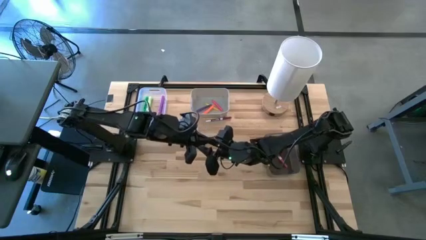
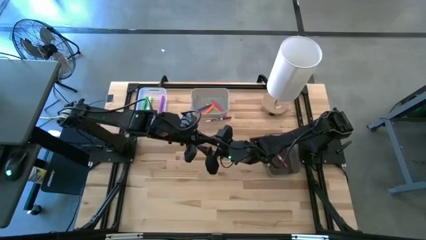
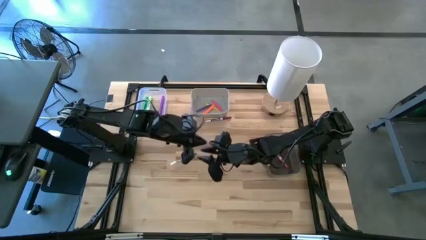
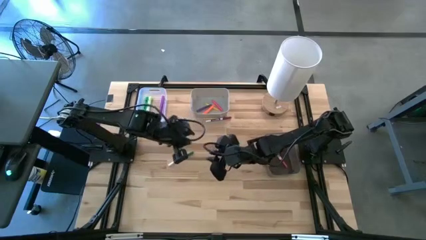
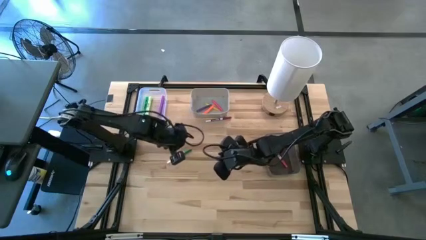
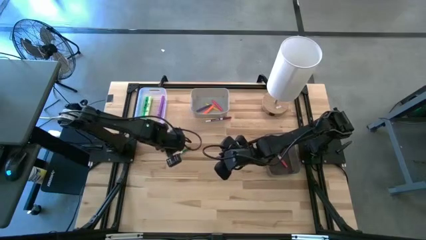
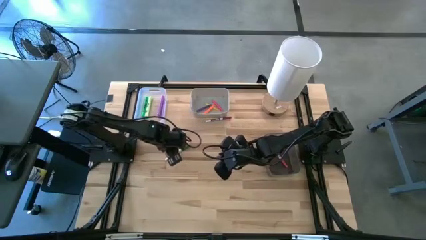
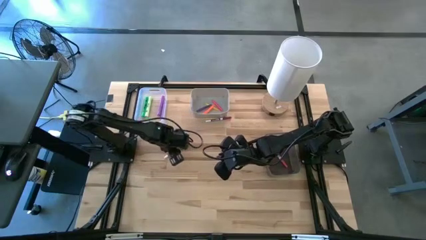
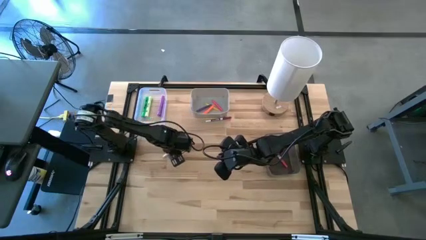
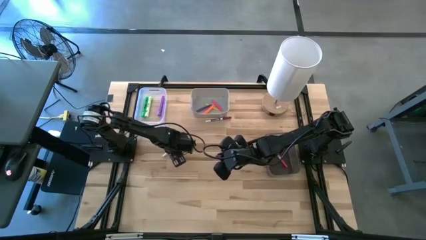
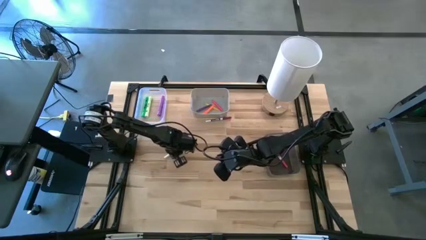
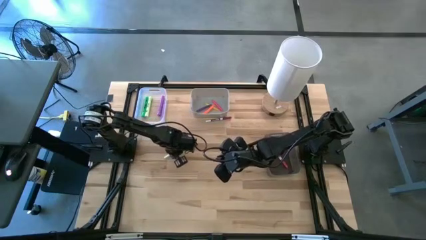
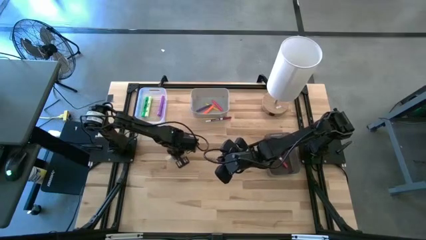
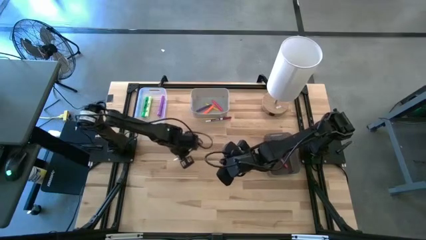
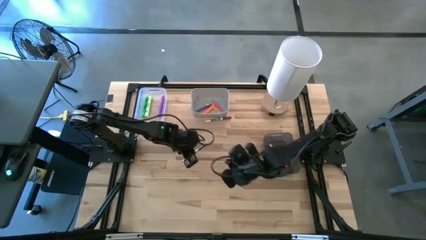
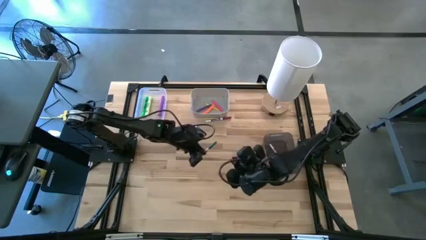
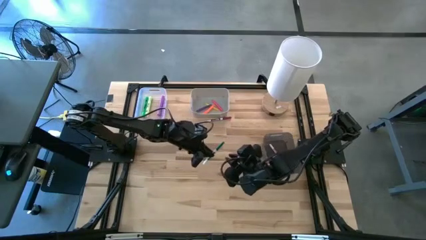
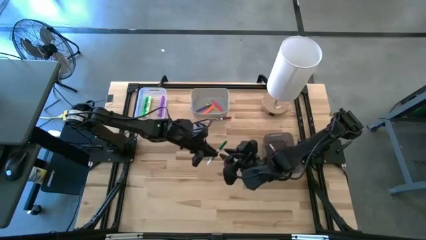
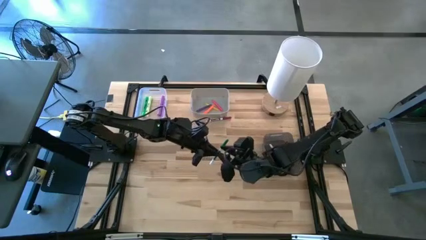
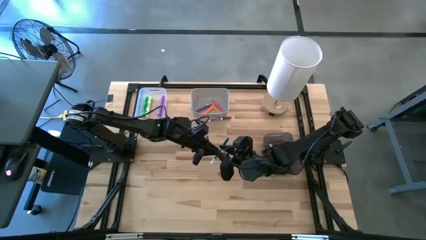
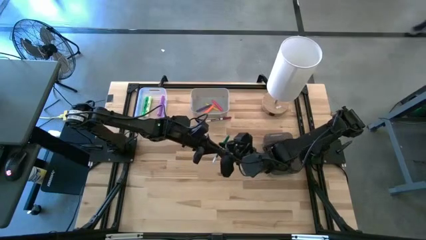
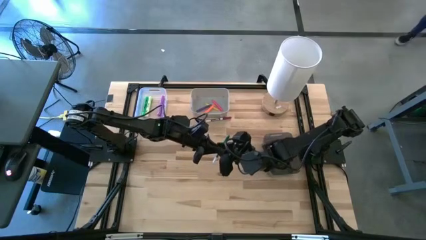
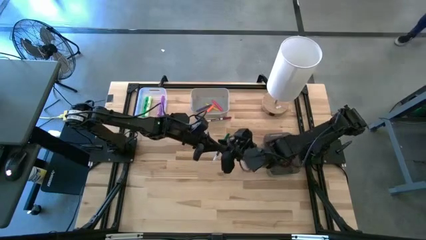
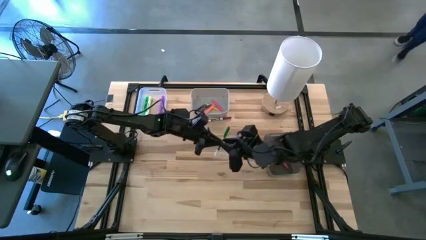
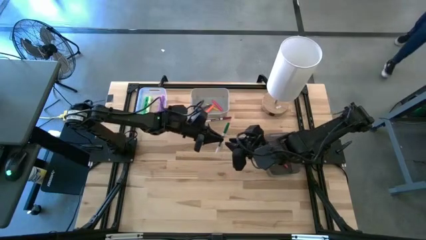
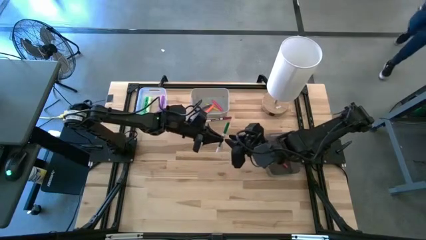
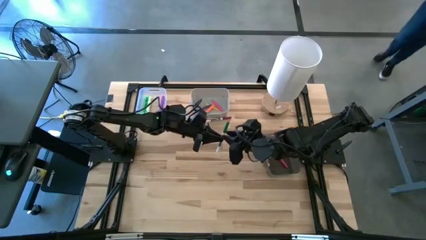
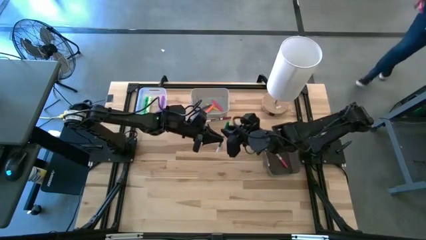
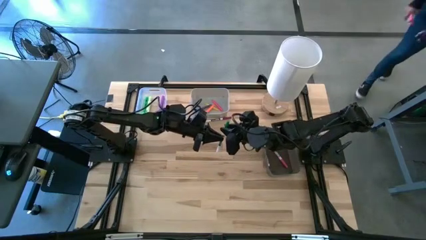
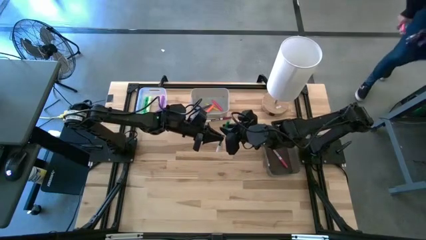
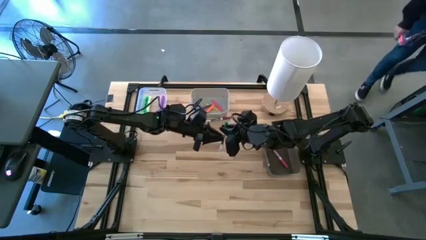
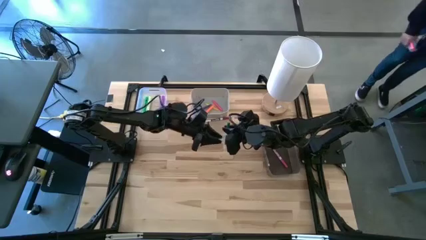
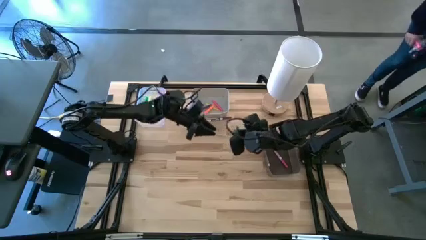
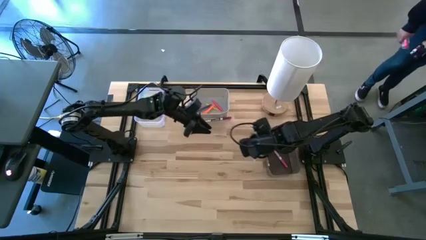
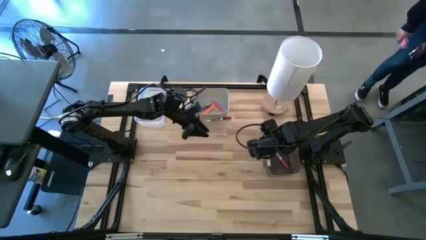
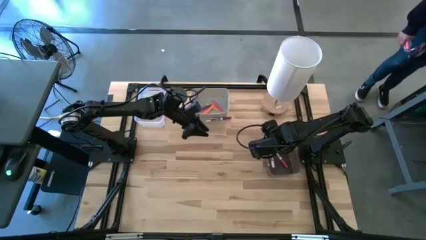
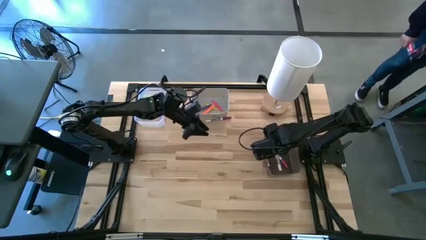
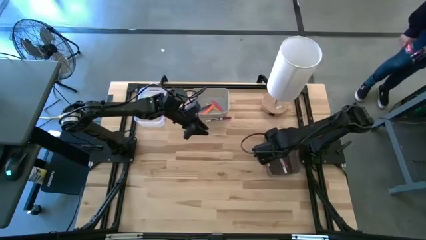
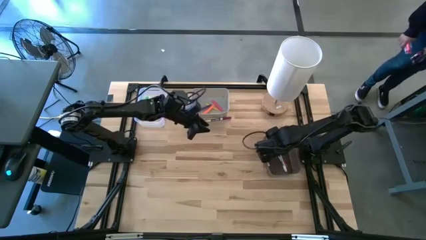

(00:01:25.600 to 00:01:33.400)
Task: Pick & Place Markers
Put the green marker into the black bin

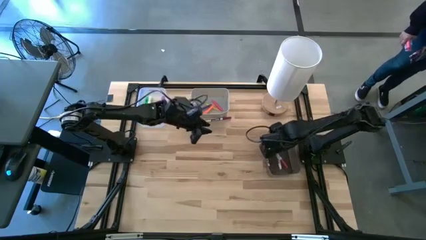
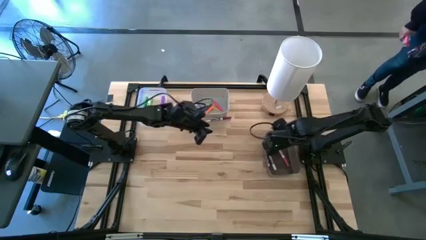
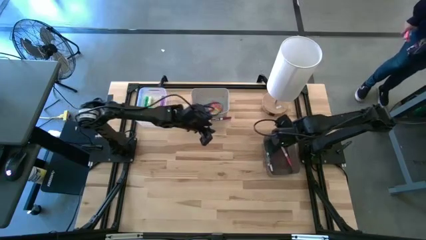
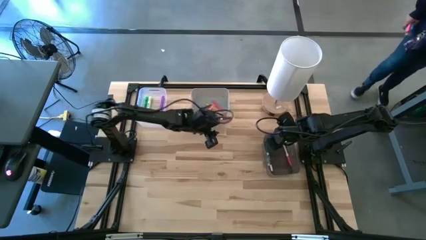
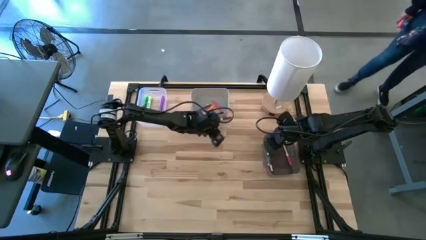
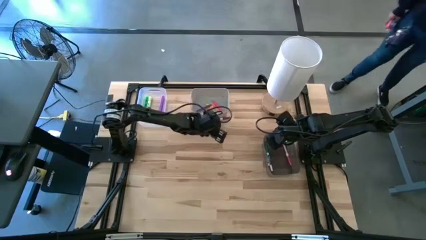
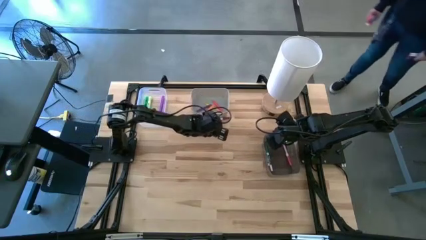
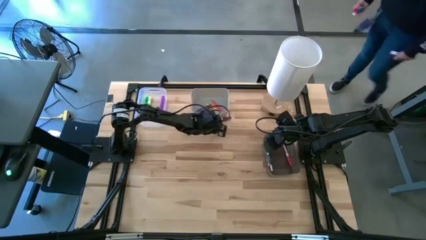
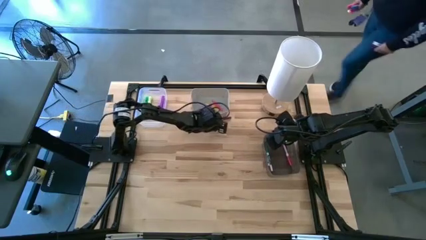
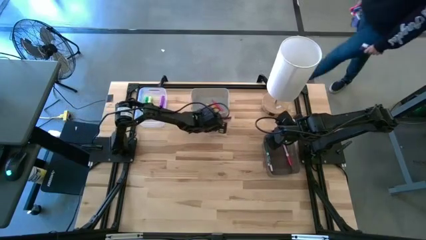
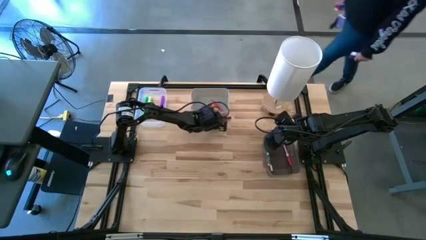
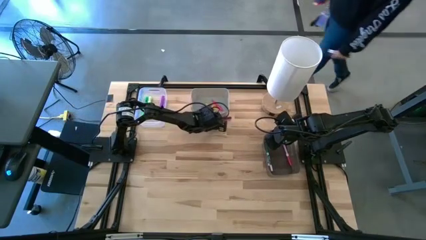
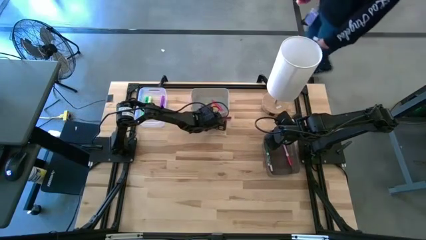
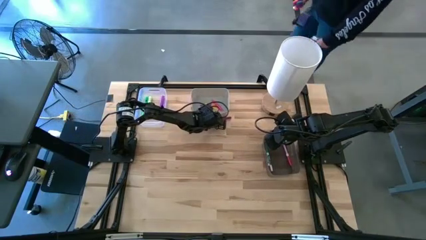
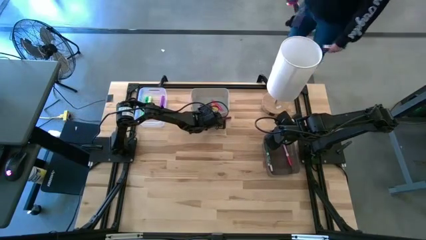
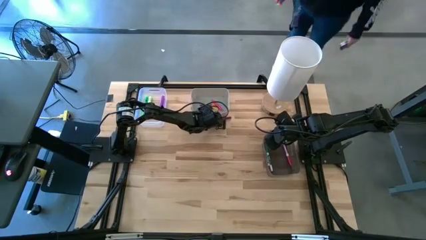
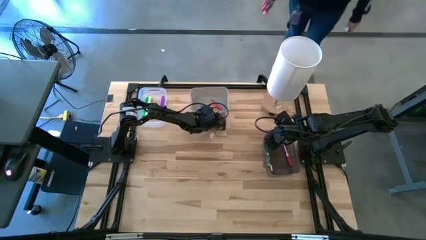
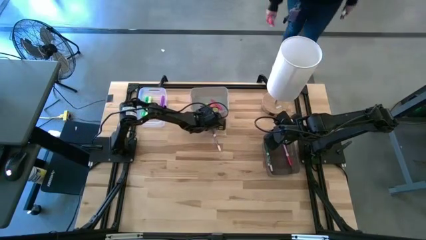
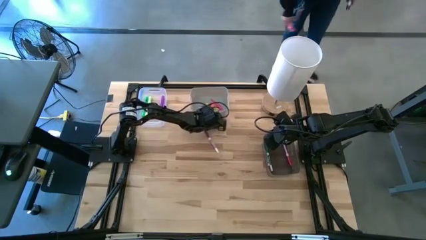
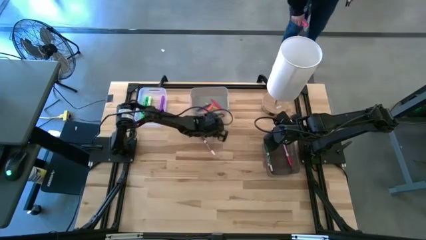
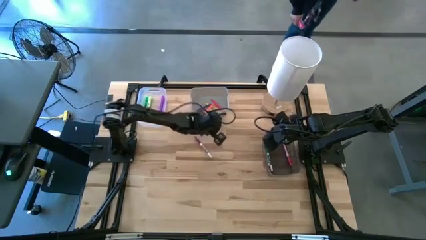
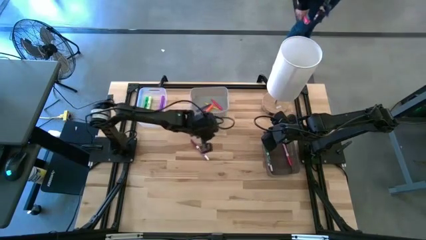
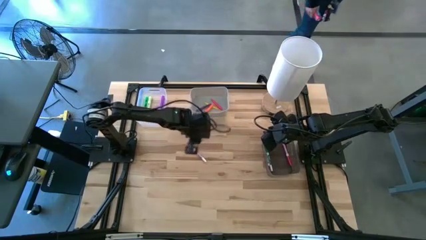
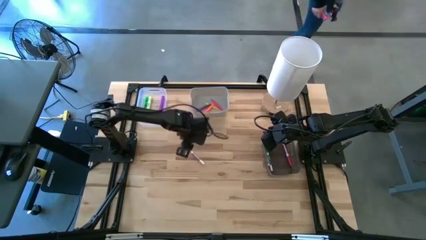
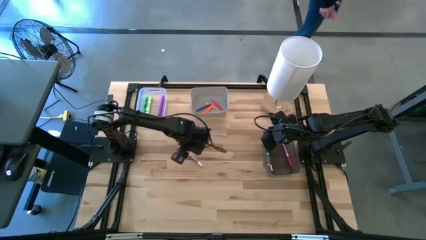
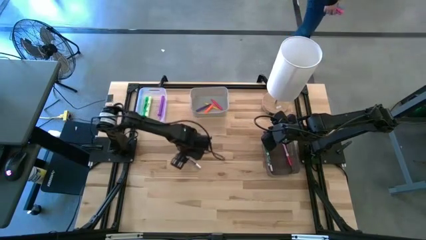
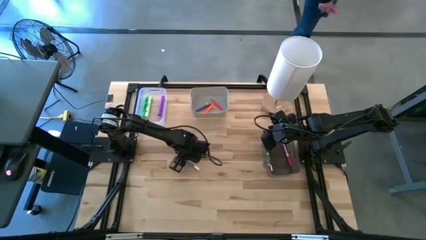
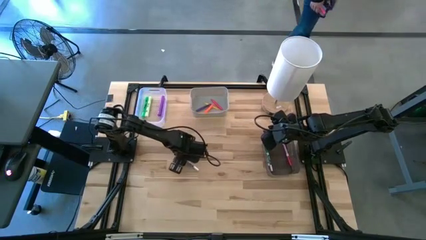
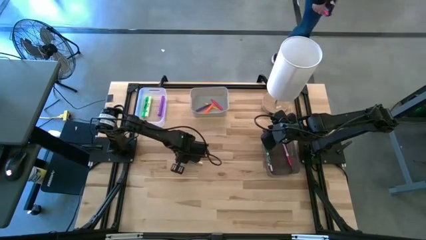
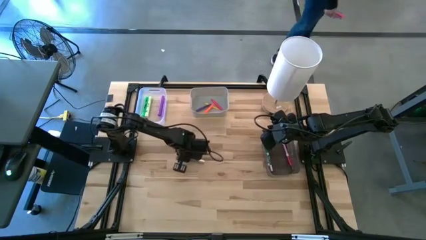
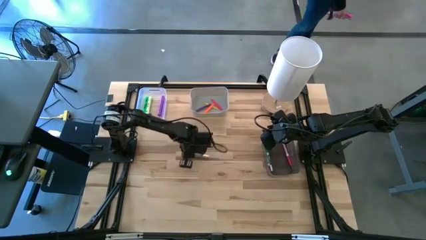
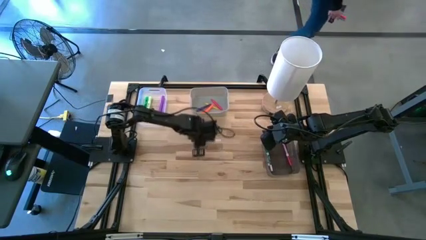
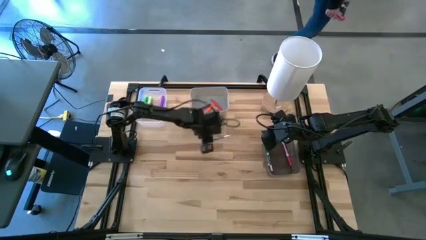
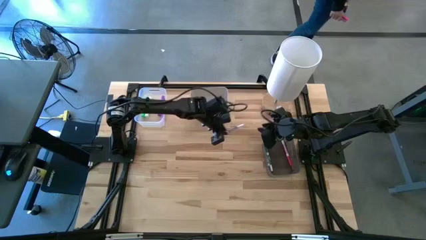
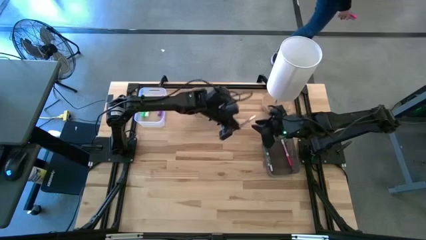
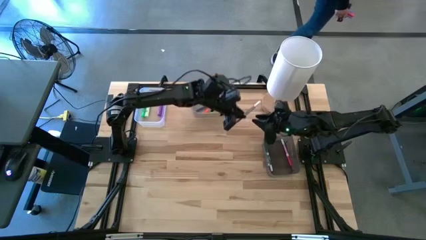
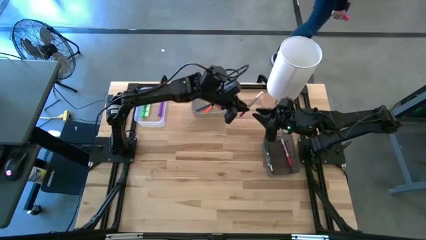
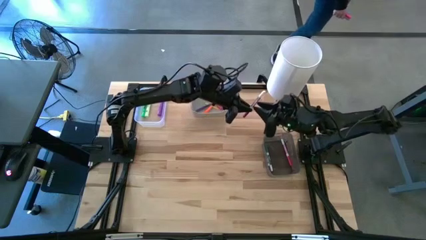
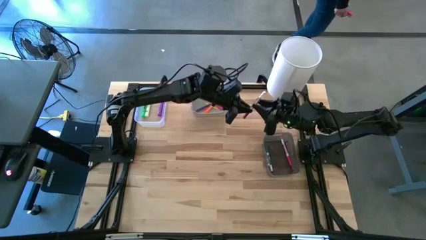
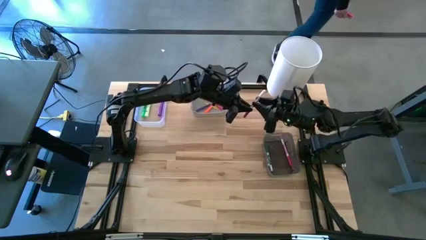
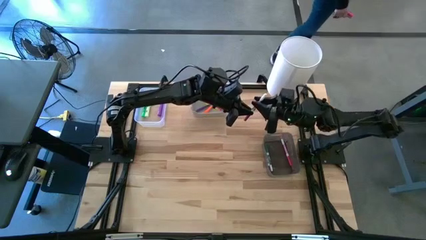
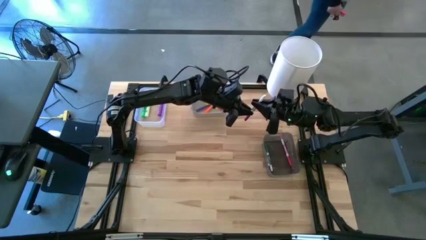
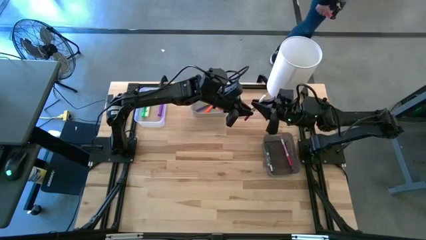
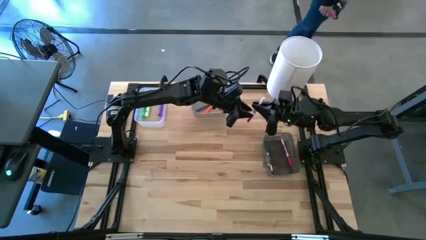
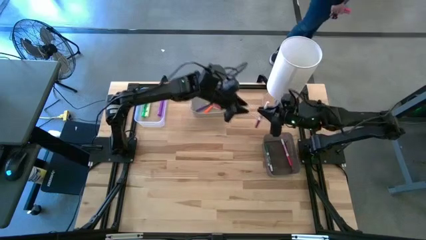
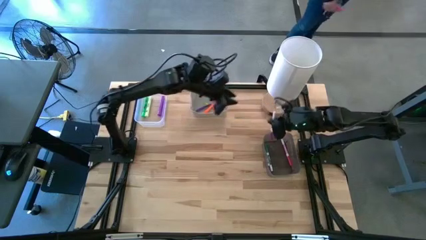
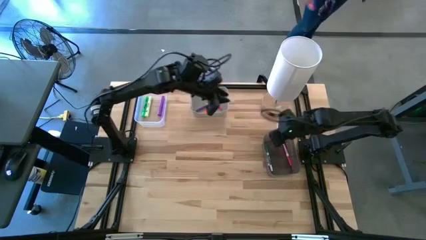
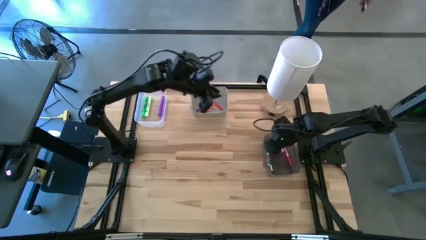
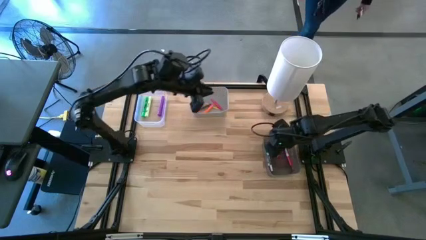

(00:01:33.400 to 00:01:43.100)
Put the purple marker into the black bin
